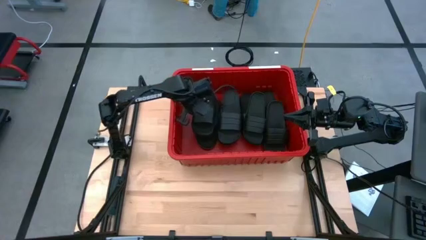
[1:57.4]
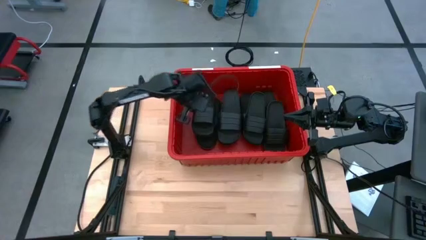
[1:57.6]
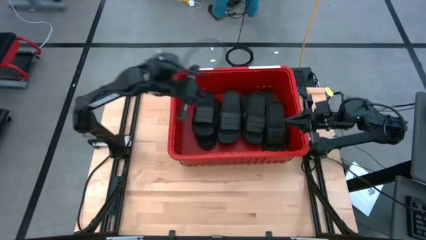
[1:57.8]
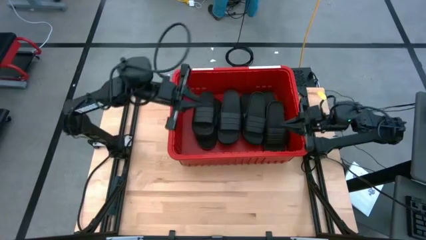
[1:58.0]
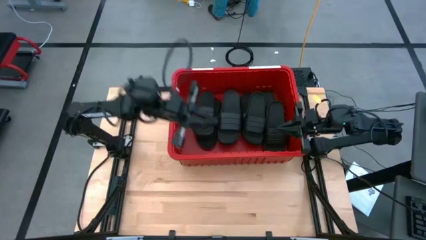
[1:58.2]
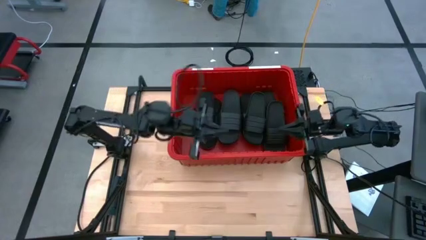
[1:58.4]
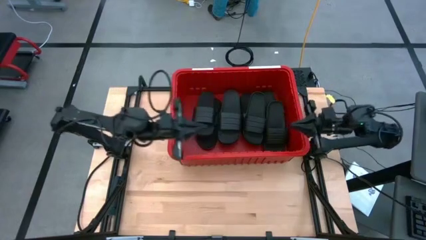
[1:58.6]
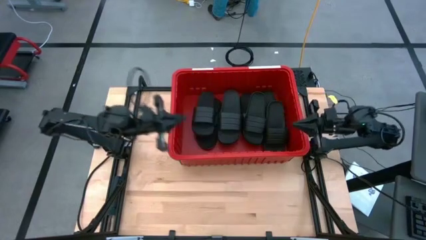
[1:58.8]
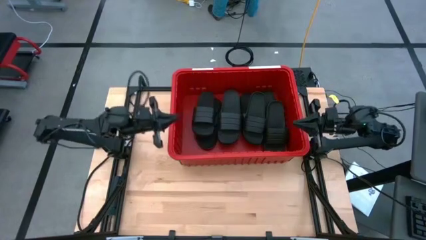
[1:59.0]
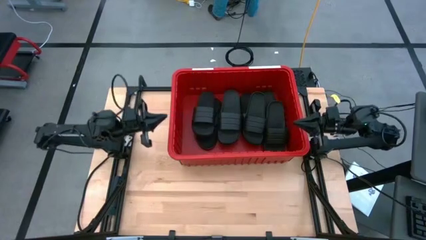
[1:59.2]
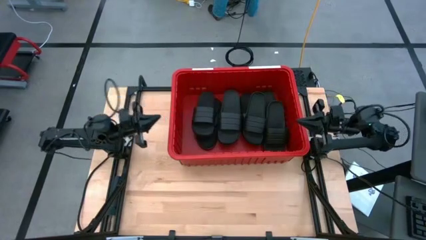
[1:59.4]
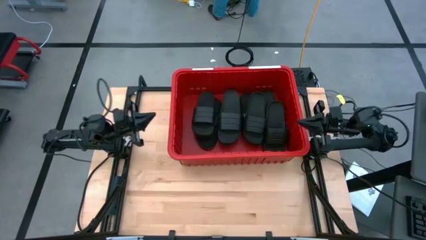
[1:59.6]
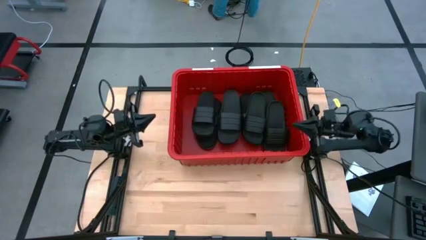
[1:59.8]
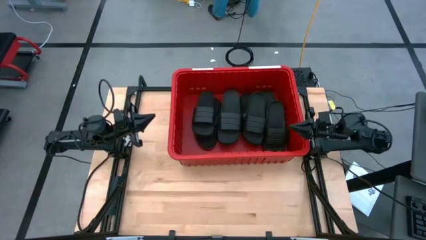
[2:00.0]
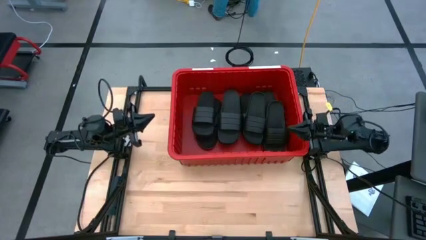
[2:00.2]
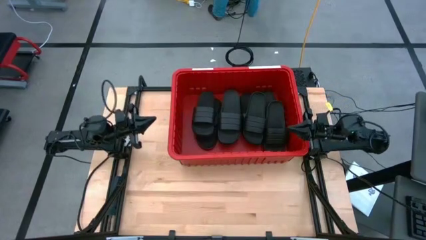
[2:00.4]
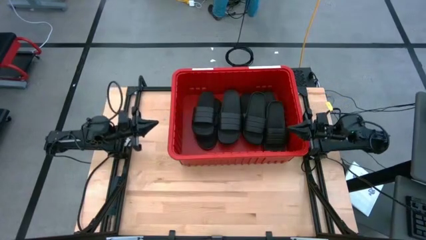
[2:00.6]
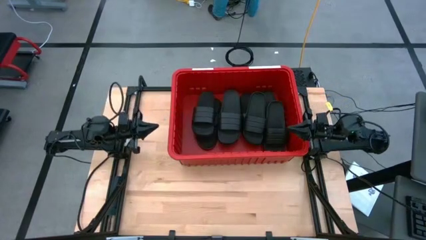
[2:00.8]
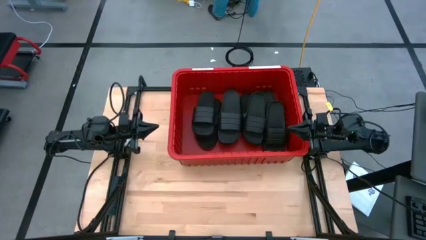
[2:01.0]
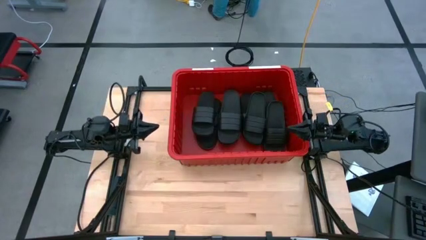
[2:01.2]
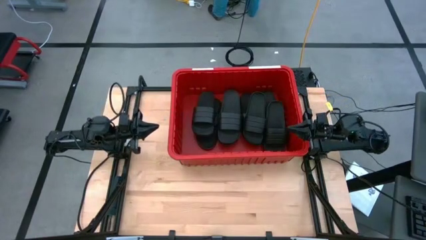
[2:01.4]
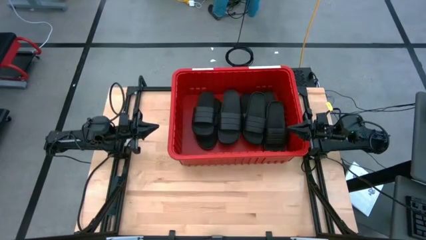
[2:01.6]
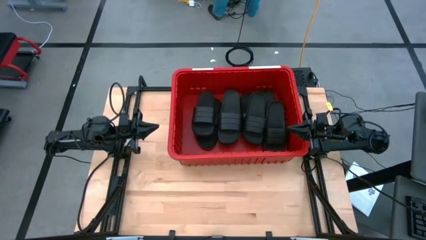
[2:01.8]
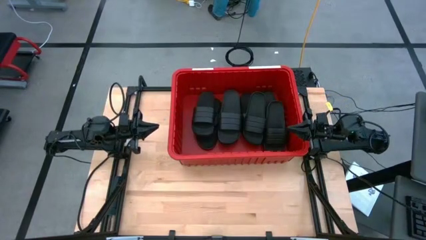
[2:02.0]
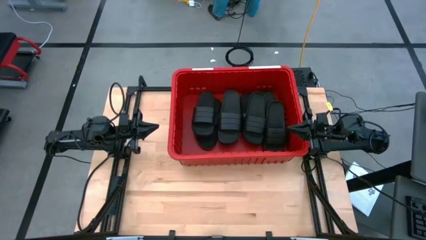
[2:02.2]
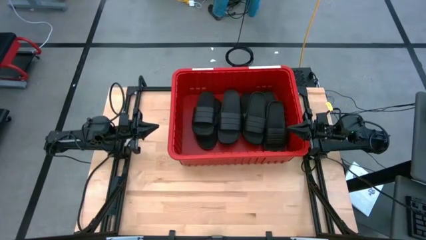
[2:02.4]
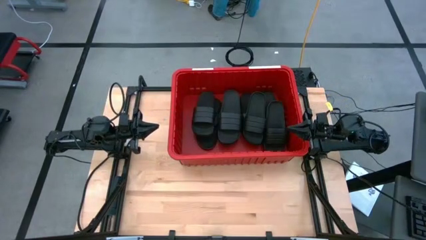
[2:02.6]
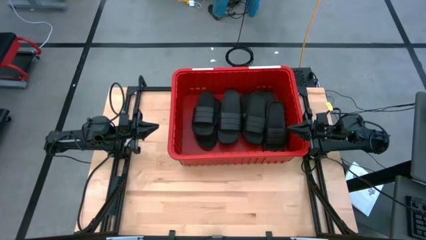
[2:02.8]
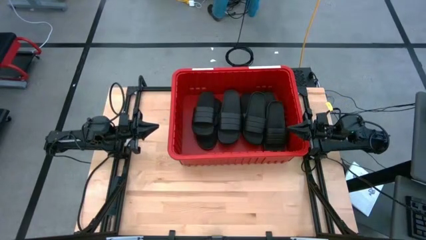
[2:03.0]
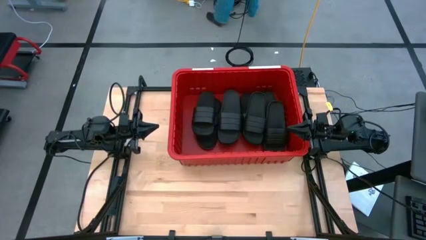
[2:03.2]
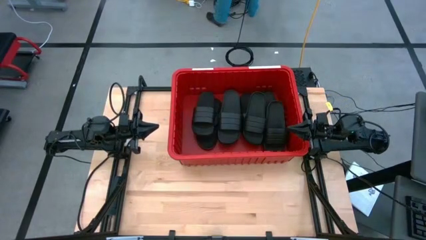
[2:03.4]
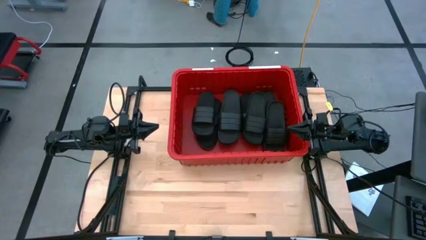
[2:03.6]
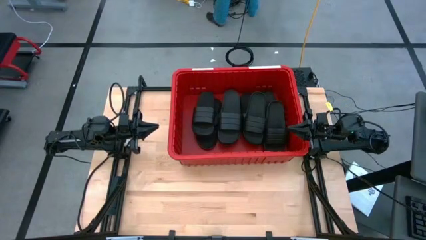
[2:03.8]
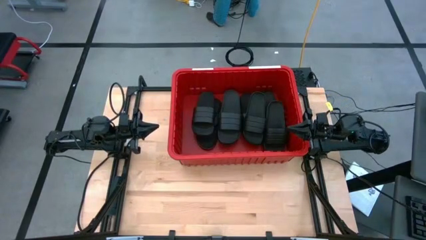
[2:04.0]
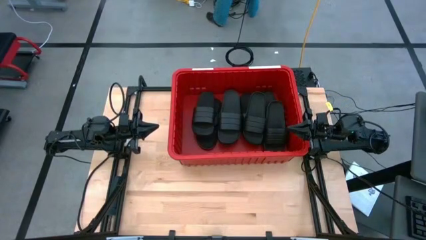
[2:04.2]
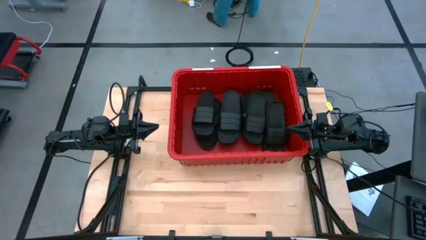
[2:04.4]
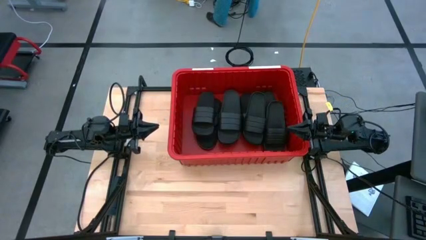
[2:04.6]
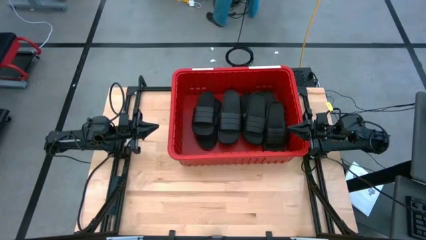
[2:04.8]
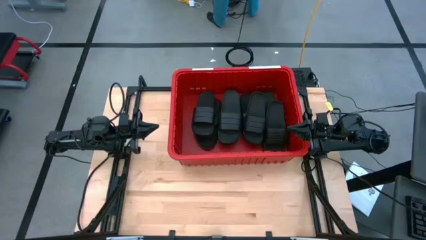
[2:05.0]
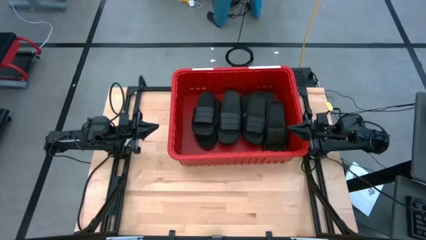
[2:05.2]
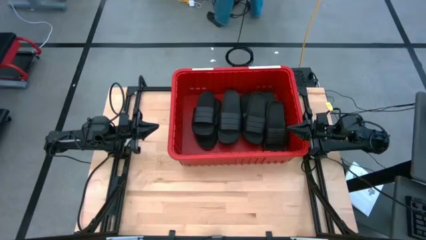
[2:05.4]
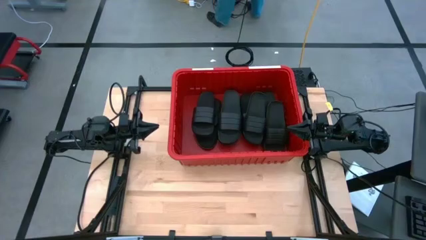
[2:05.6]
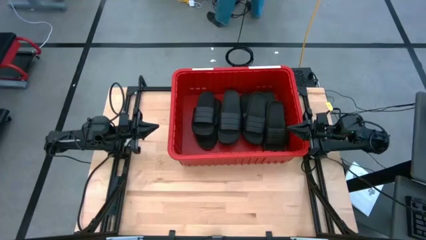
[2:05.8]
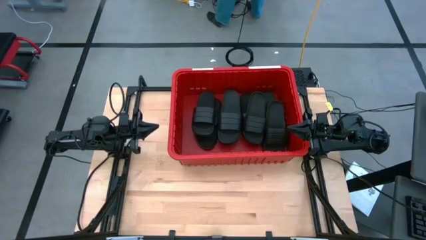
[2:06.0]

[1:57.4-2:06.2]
Task: Pick and place slides into bin
Return to Home Position

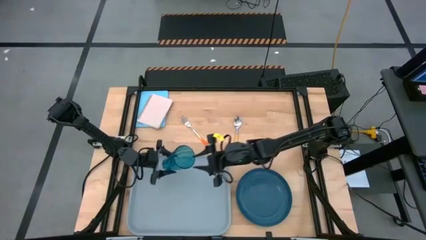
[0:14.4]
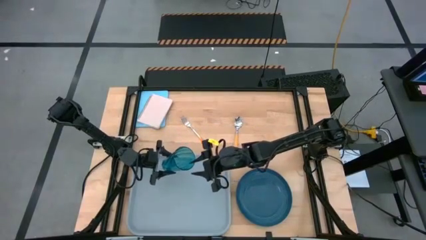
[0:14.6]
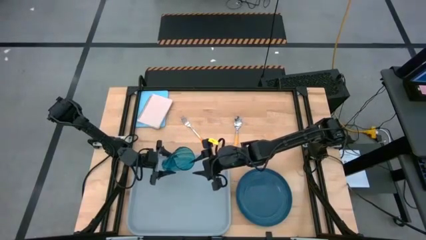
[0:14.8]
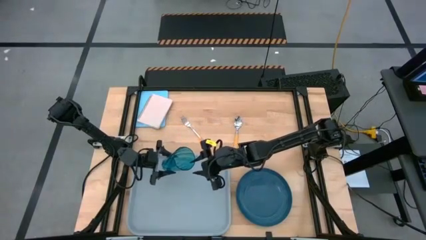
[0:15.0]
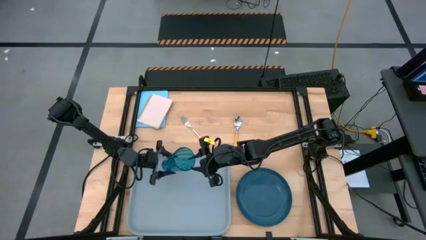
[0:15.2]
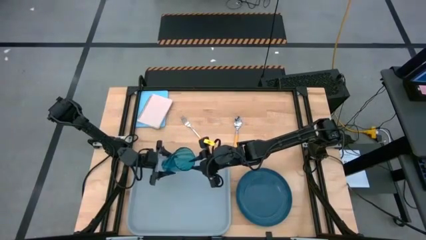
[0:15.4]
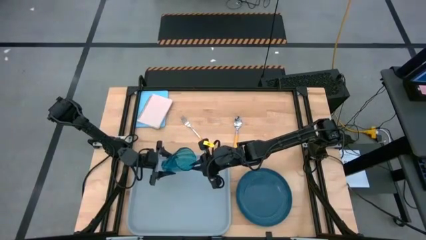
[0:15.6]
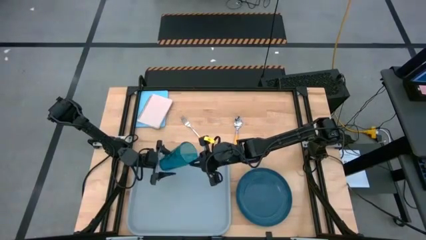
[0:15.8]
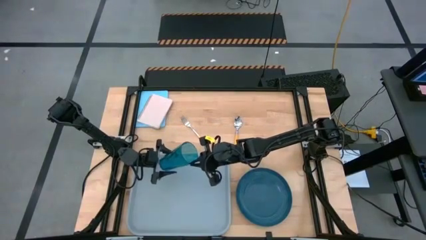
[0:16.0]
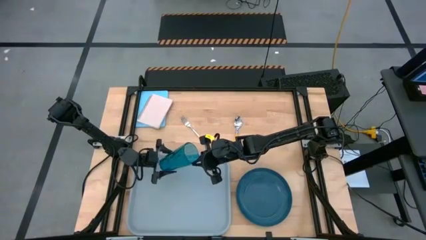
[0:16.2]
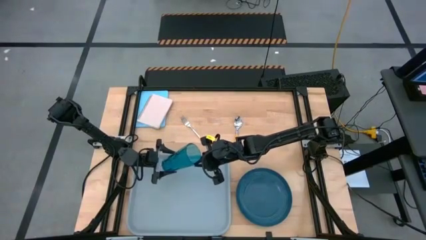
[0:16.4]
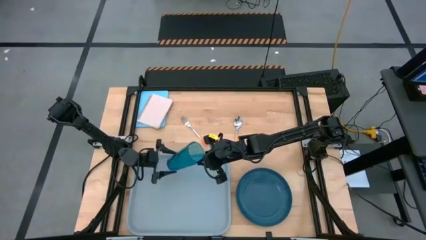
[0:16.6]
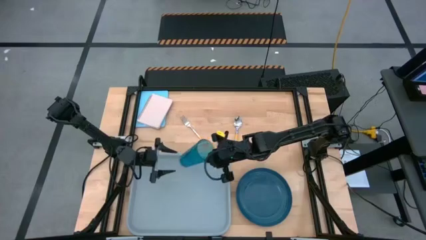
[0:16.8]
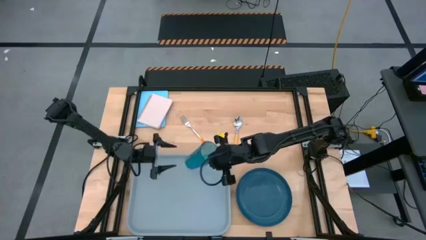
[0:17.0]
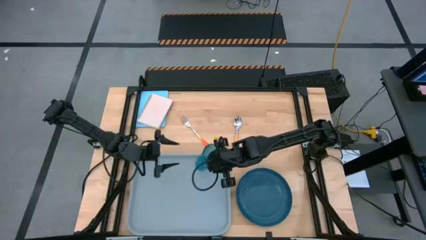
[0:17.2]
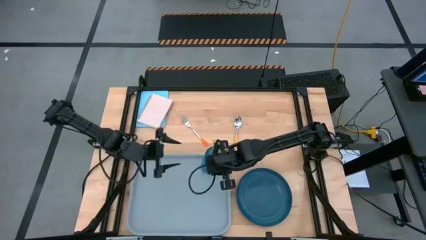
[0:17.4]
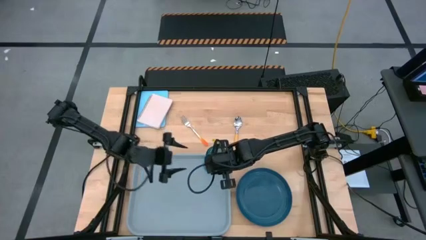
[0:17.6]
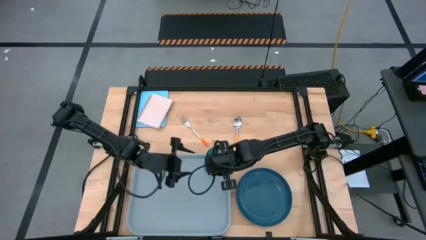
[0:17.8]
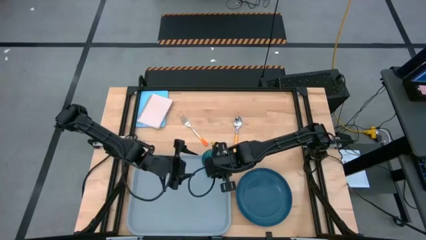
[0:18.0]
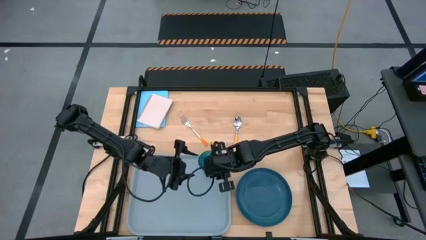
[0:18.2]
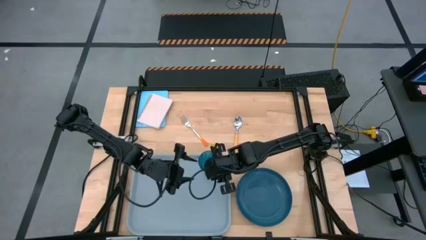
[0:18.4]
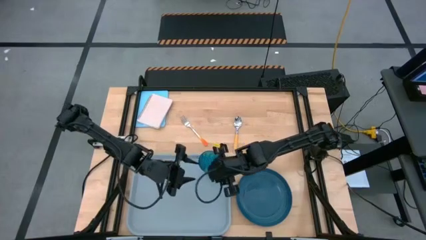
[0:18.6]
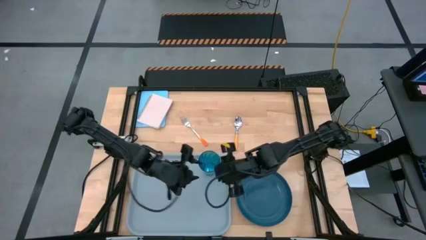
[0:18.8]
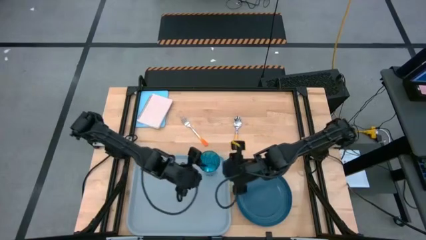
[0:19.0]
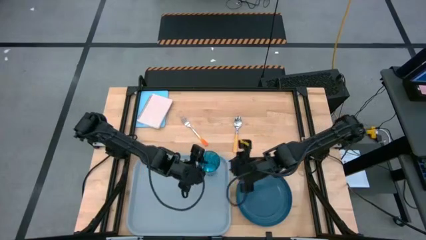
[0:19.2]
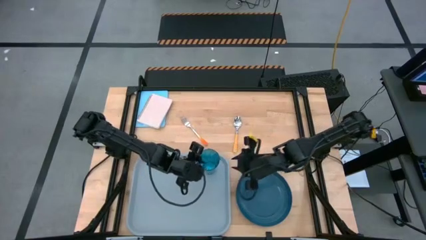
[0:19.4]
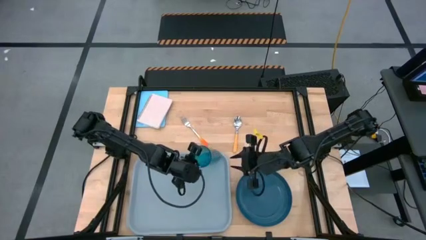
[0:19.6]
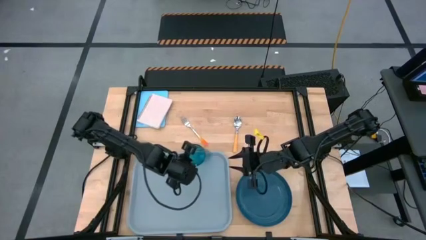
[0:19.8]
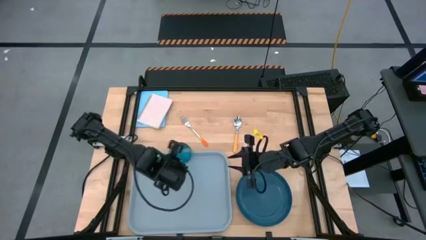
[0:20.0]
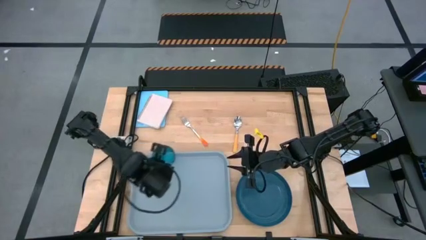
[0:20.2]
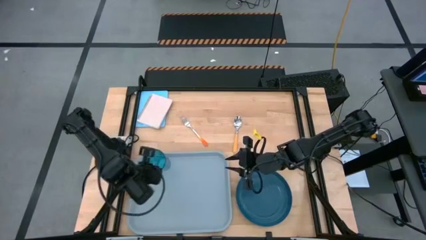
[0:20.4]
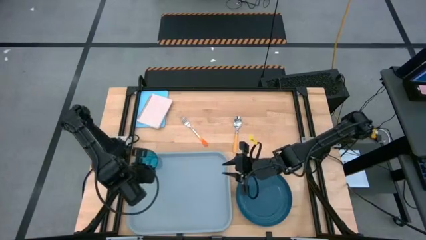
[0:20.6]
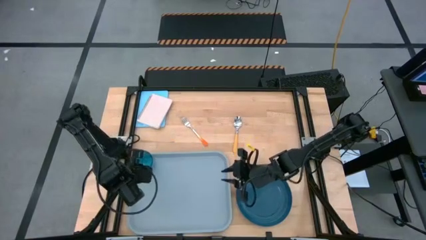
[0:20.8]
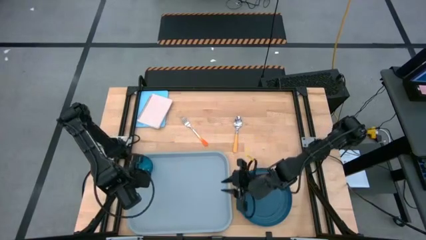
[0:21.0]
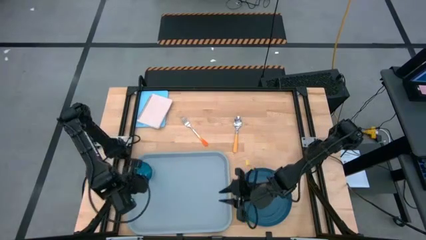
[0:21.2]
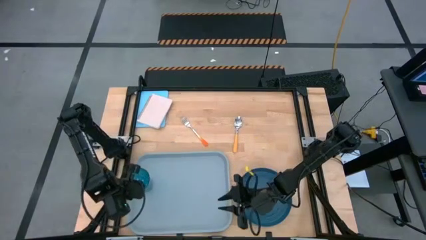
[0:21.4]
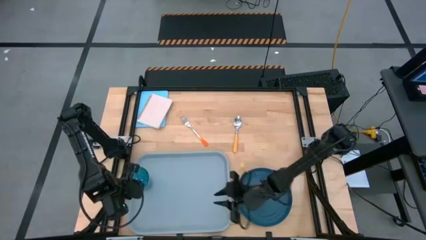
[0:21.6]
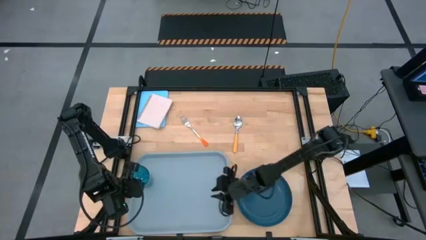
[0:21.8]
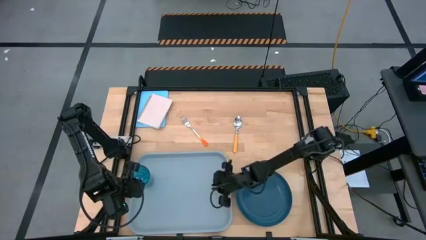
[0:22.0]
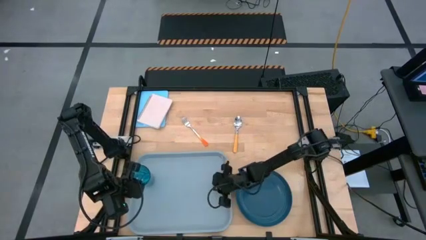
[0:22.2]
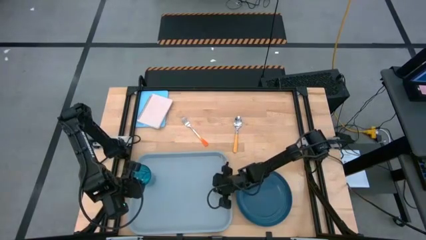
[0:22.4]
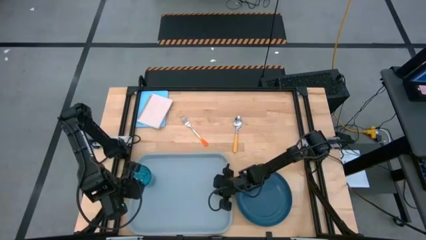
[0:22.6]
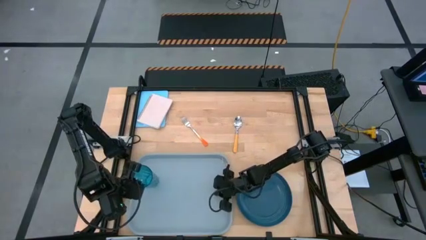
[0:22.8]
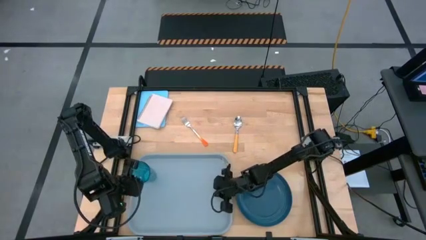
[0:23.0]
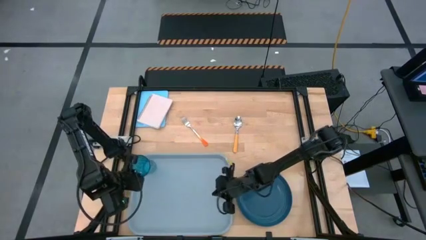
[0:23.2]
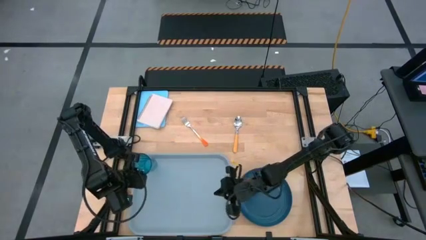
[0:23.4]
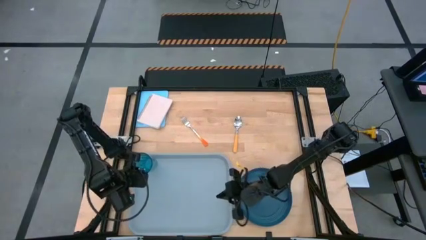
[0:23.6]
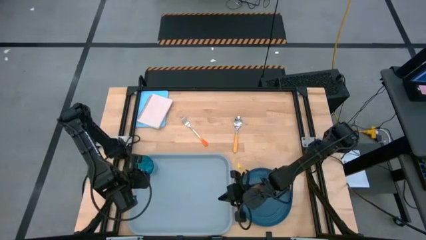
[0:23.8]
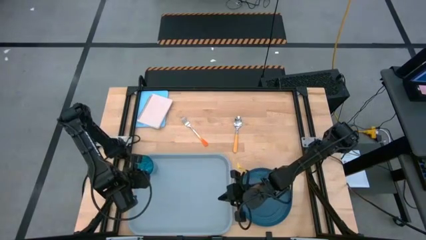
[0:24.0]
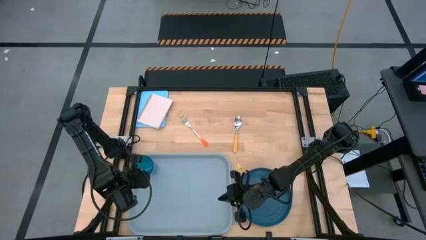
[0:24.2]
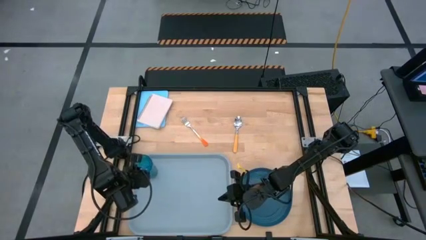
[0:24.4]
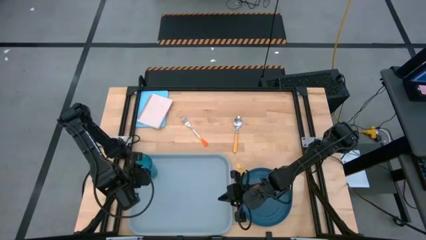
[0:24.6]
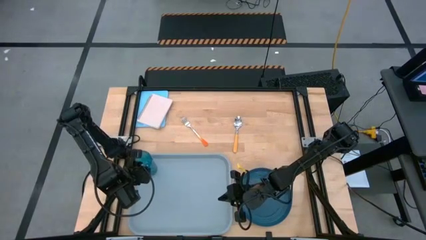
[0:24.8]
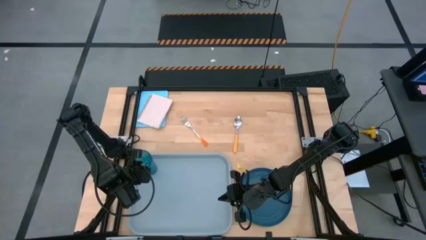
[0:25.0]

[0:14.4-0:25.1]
Task: Pick and place plate/cup/fork/spoon on tray
Put the blue cup on the gray tray
